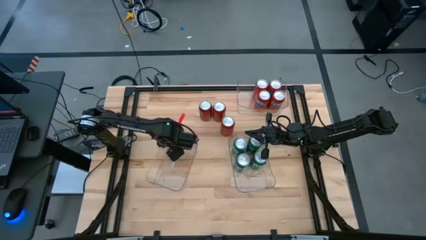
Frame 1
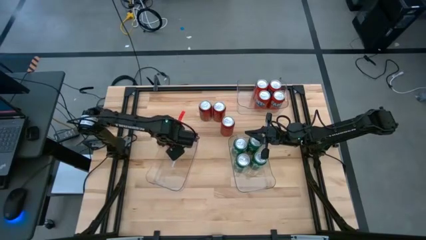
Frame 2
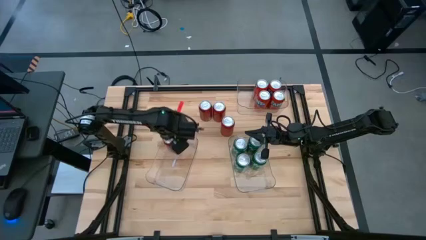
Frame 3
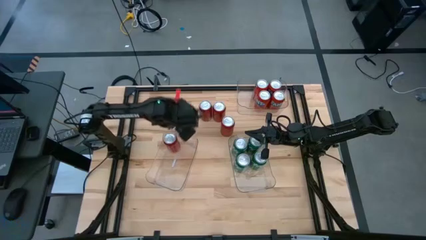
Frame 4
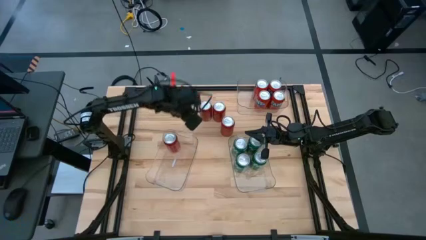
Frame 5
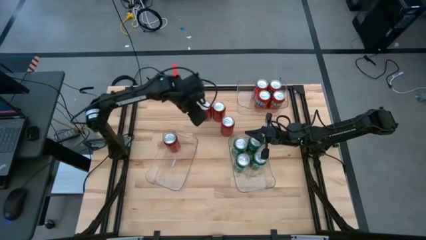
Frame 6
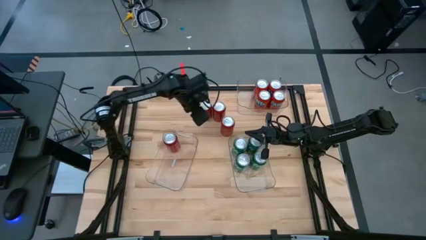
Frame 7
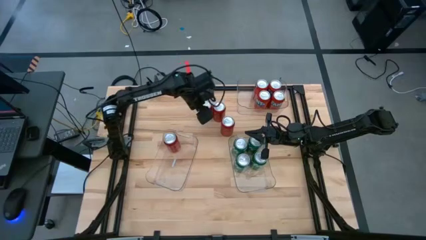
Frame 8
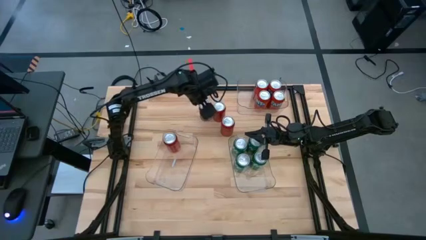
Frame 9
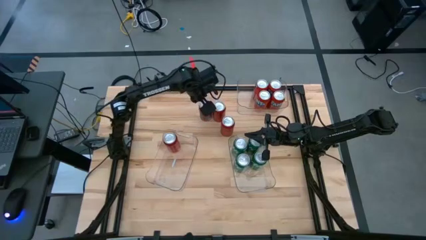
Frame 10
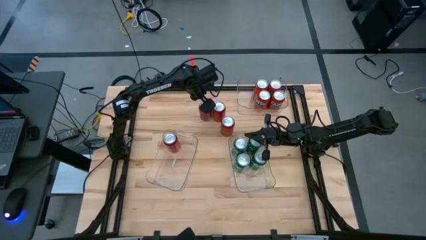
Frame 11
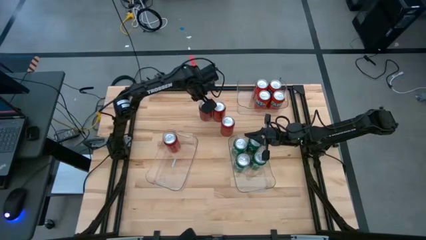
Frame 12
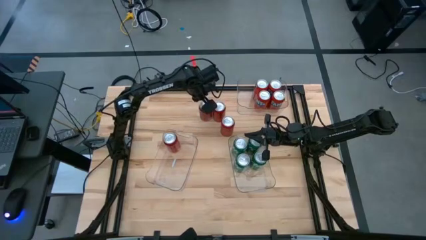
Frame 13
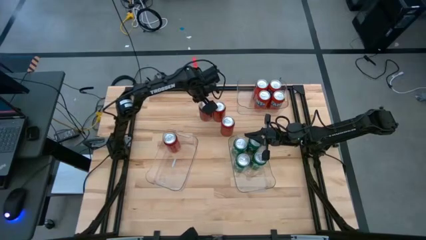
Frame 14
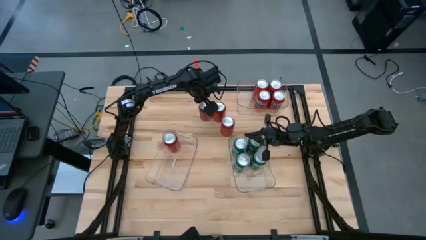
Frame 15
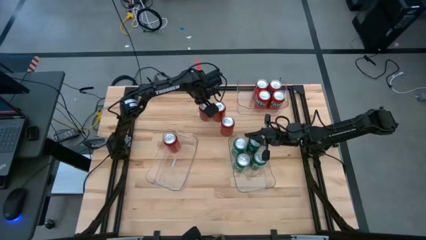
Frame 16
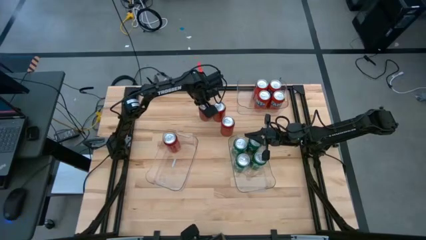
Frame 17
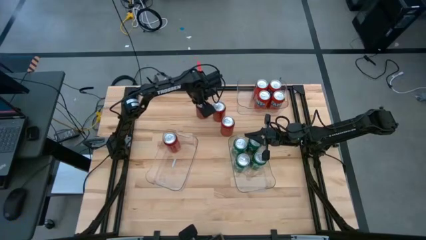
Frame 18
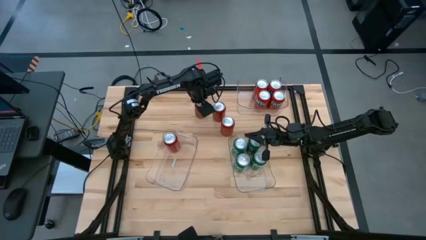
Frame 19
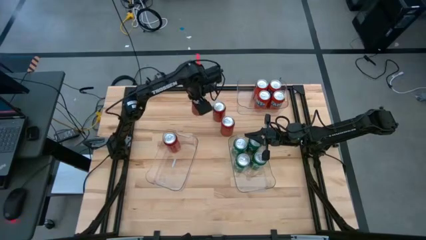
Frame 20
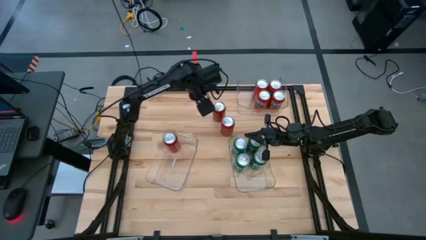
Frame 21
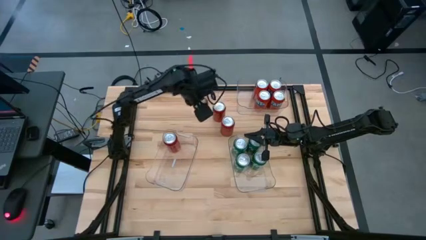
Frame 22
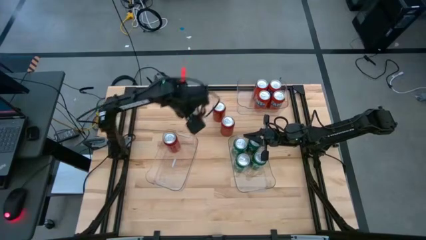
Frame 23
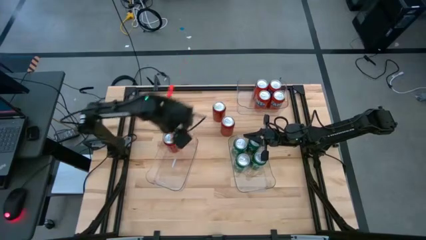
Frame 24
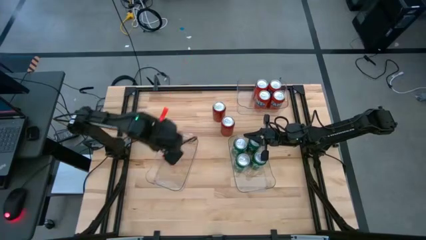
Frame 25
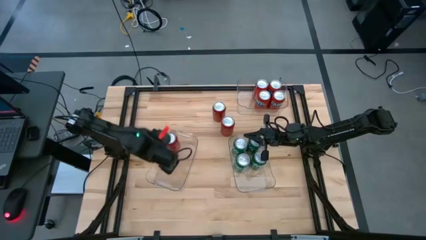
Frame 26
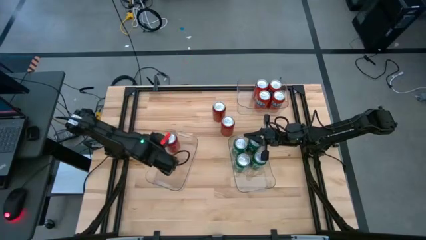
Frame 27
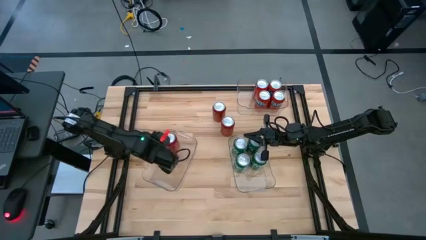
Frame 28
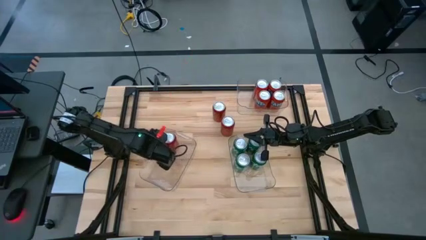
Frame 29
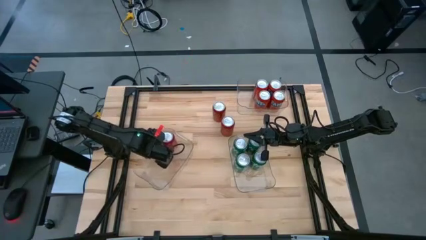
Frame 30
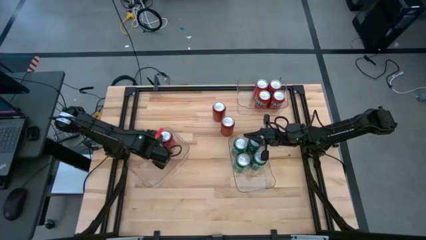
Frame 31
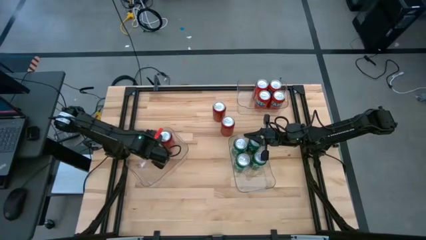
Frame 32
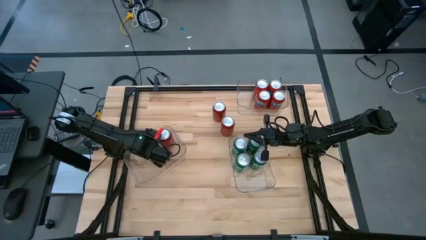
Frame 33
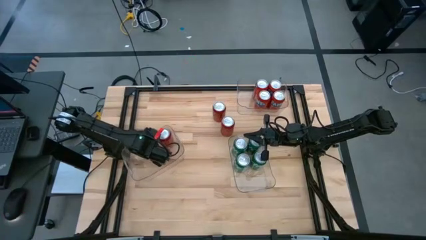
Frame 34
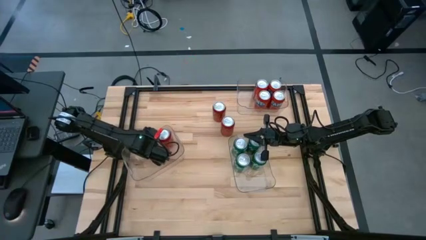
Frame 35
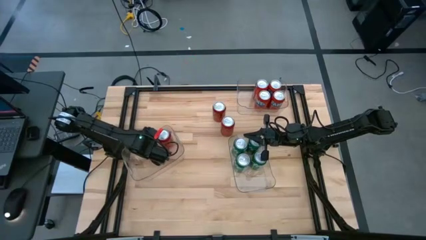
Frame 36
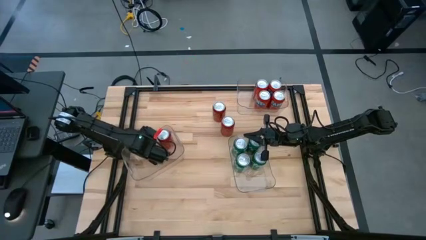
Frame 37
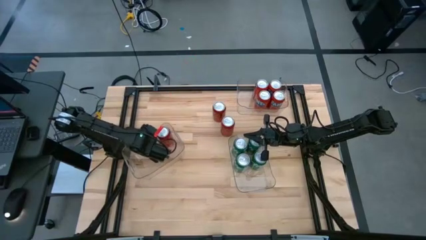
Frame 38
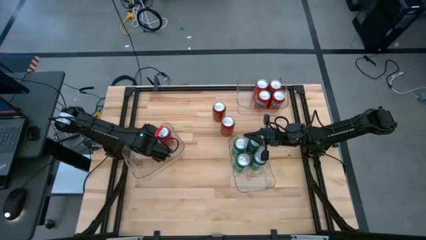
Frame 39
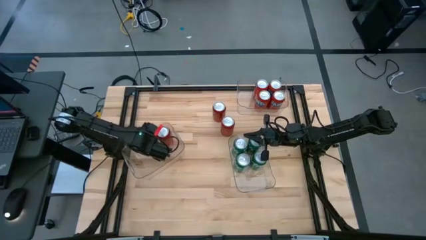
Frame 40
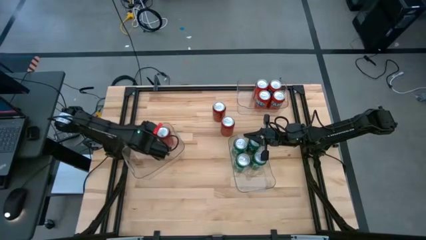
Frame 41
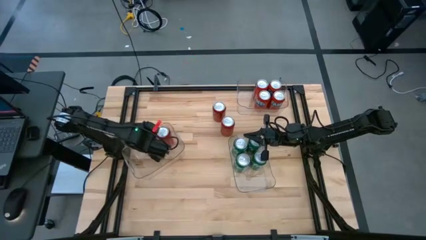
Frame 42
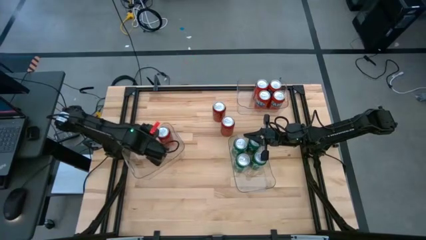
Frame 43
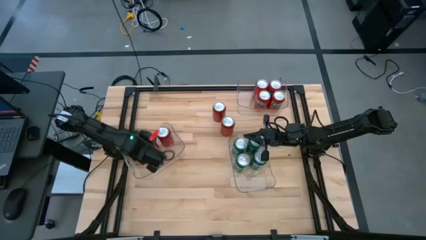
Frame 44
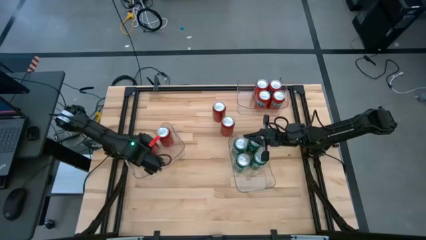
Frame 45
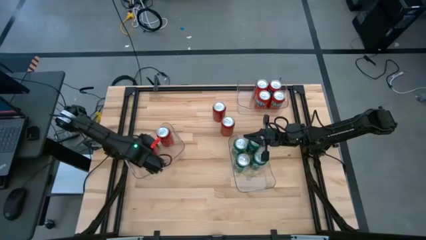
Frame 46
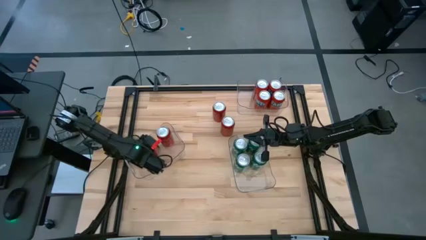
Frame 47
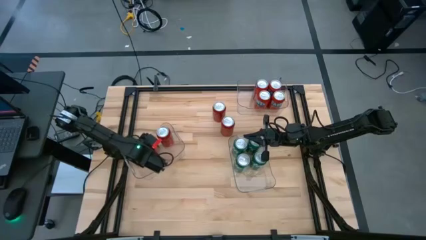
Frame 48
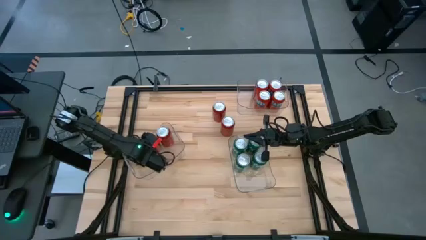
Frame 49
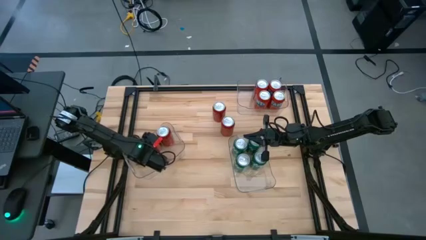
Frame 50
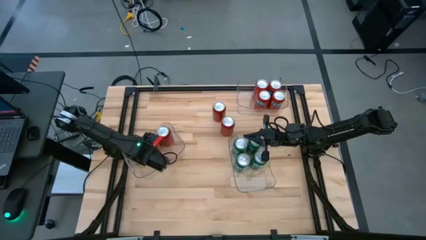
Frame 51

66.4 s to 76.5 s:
Task: Sort soda cans
Put the top left red soda can into the bottom left transparent bin

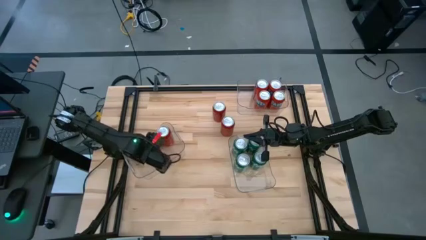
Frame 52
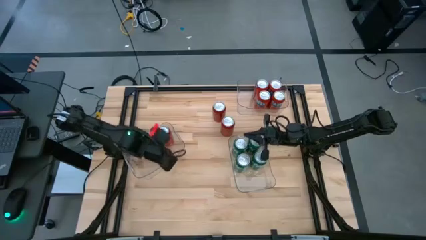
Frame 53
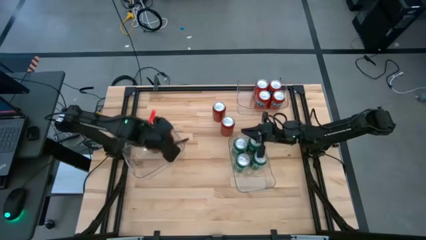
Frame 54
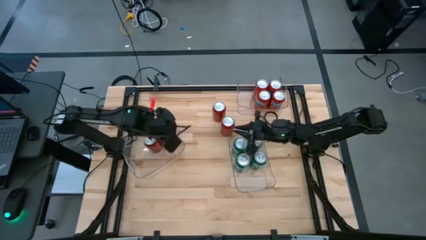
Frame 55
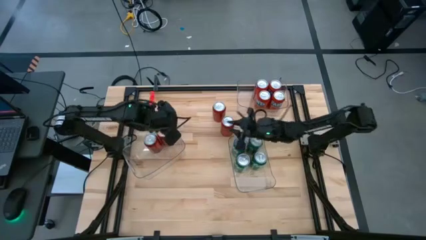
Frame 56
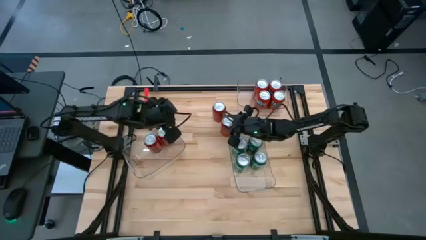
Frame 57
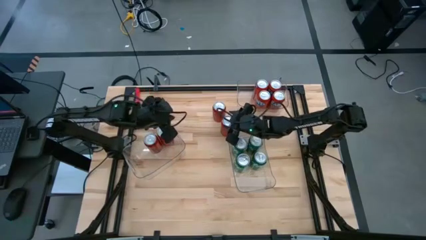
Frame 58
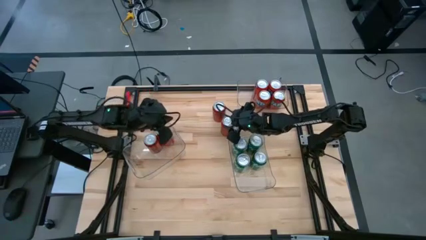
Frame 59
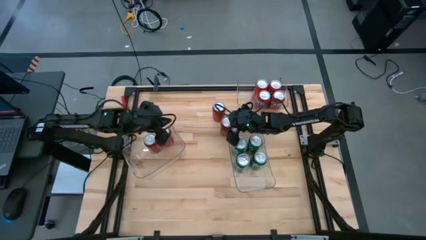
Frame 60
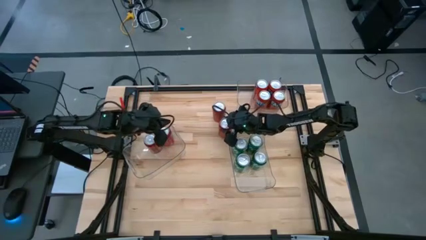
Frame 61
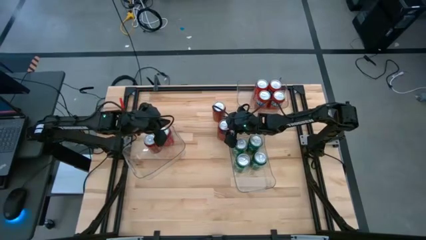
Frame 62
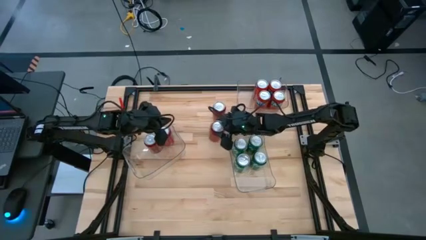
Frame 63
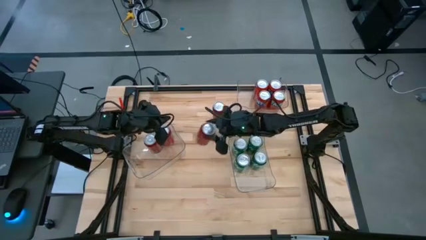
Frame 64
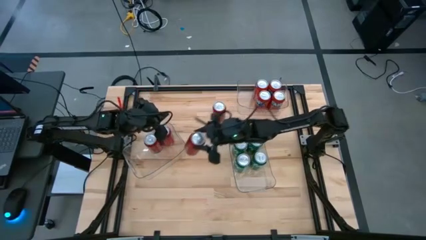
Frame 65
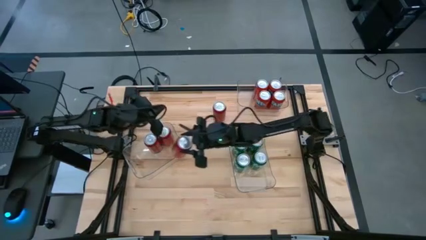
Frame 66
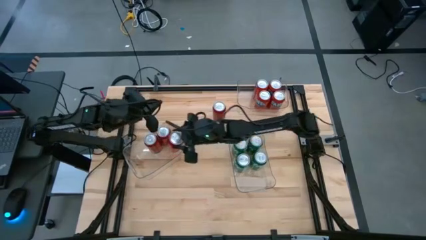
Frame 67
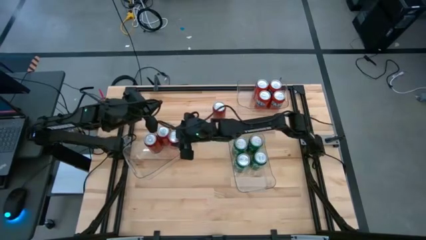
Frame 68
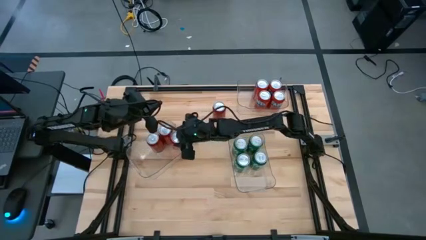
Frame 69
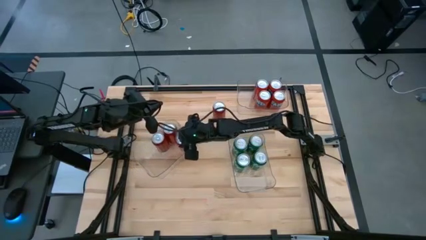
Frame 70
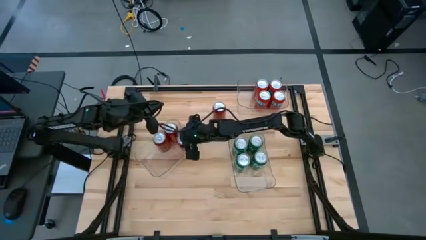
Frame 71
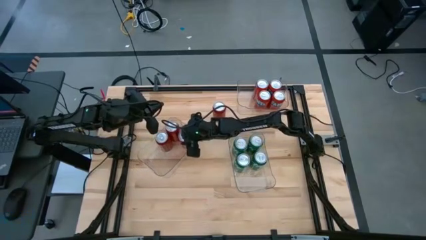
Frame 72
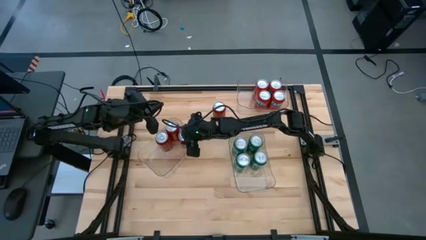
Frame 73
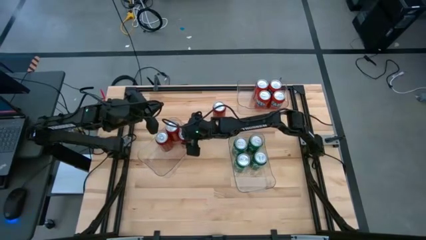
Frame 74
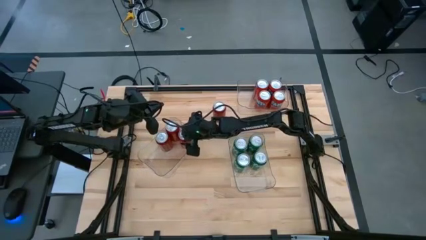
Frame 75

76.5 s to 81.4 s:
Put the bottom red soda can into the bottom left transparent bin

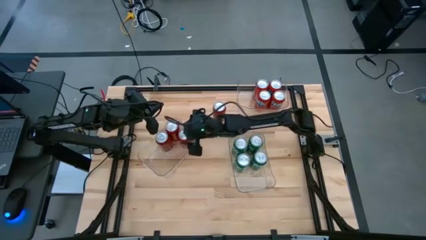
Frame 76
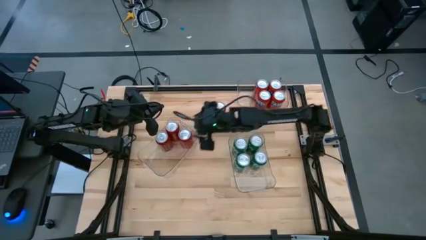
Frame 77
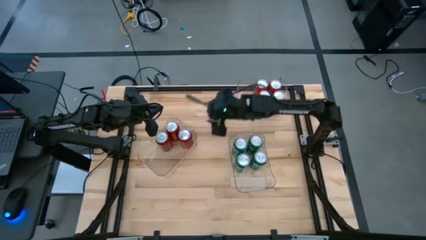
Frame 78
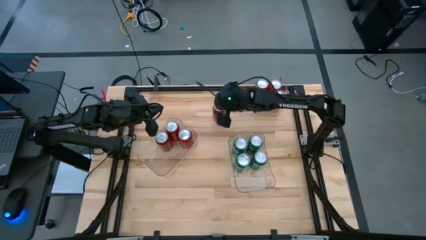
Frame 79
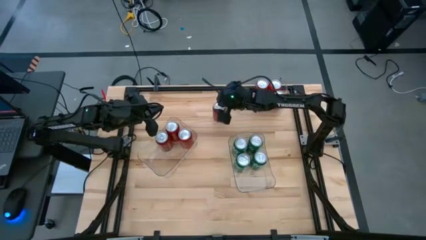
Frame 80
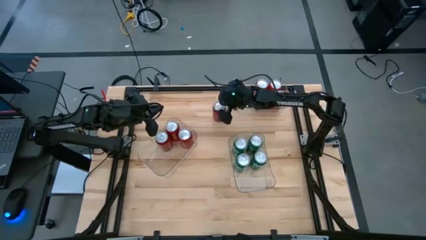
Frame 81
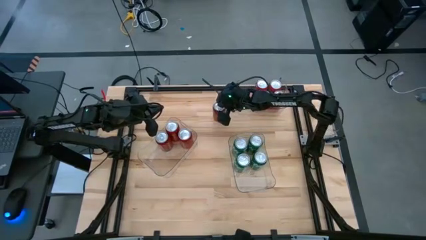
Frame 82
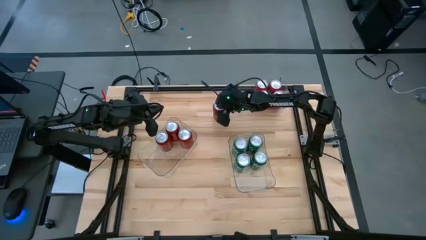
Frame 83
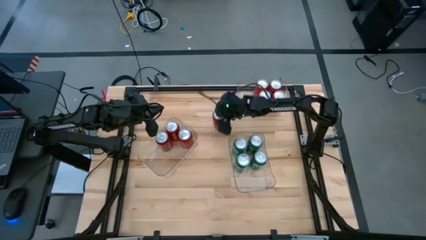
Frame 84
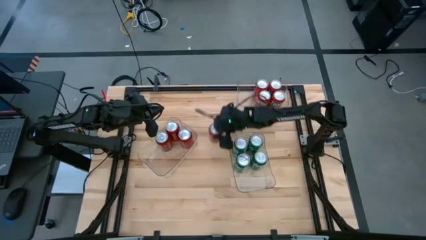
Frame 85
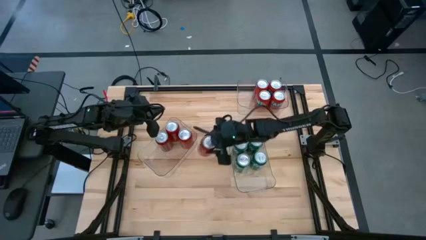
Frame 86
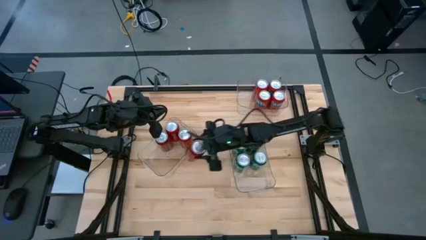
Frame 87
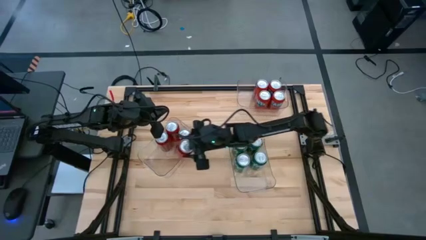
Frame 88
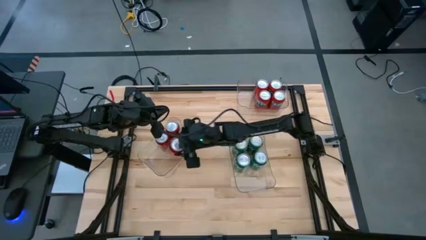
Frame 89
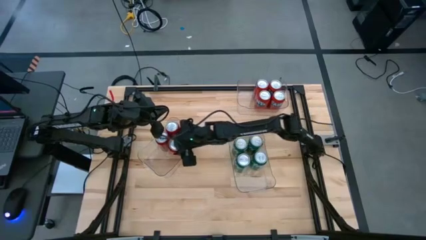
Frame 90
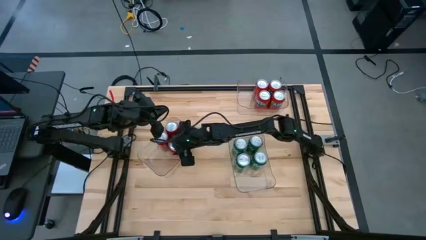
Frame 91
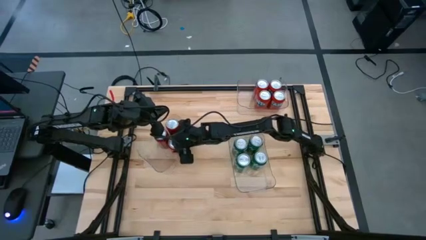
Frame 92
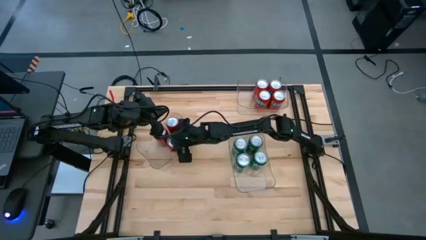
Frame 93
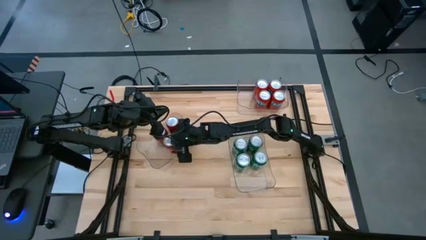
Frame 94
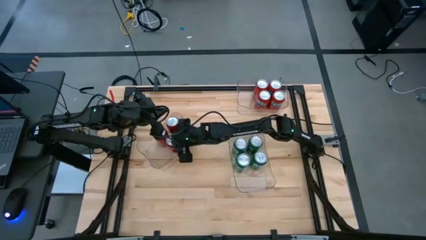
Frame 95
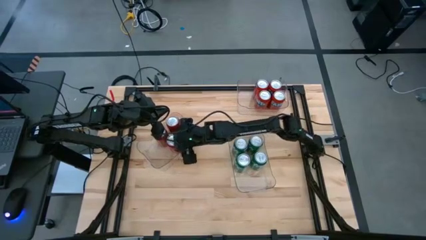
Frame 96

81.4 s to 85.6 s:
Put the red soda can into the bottom left transparent bin
